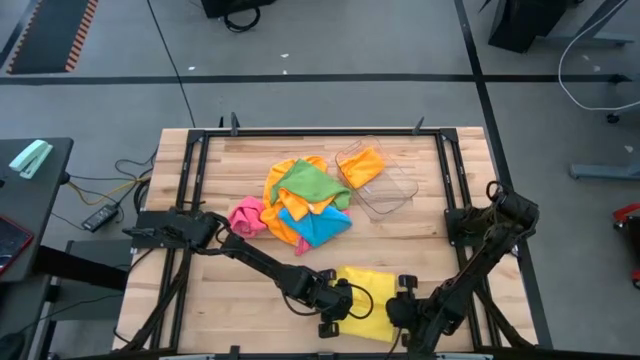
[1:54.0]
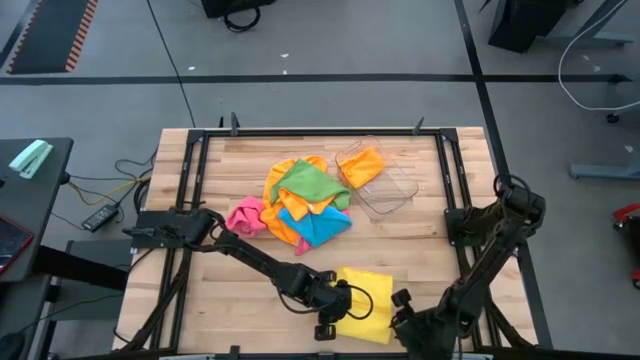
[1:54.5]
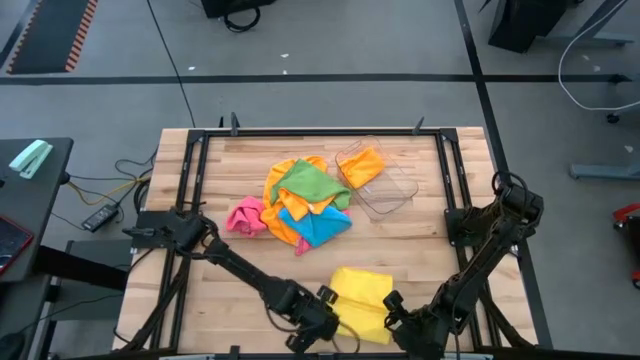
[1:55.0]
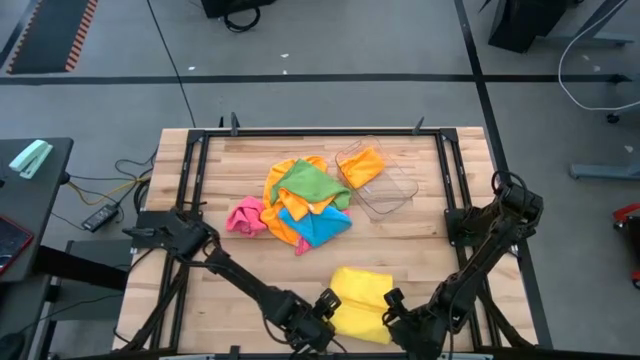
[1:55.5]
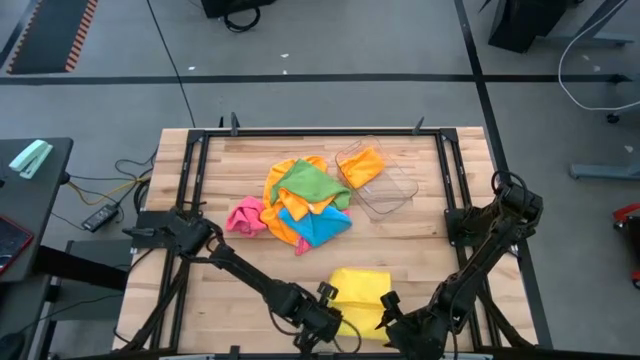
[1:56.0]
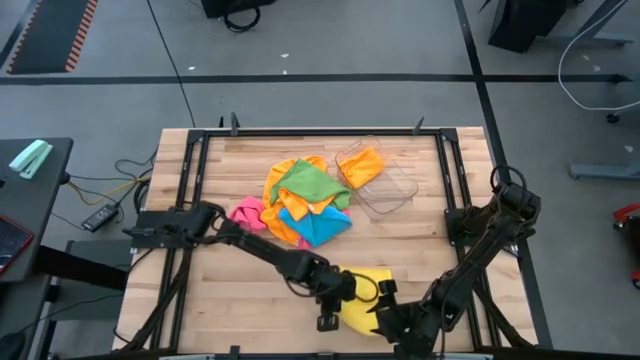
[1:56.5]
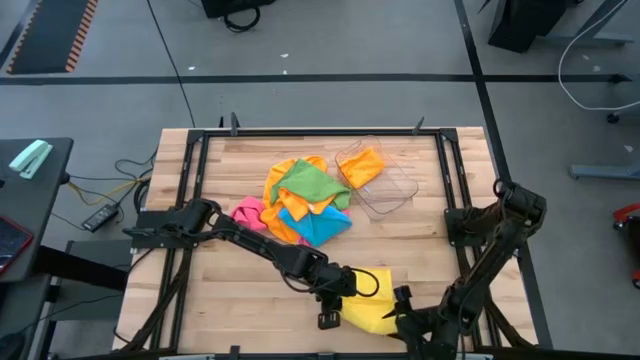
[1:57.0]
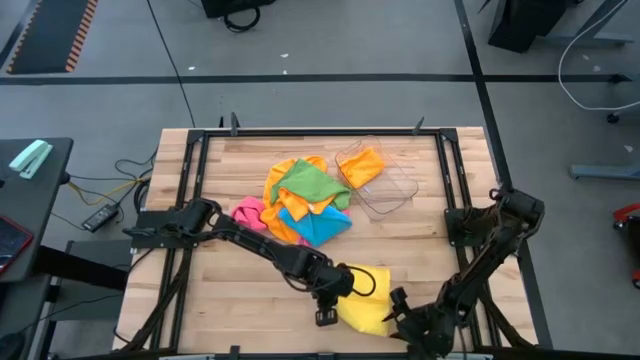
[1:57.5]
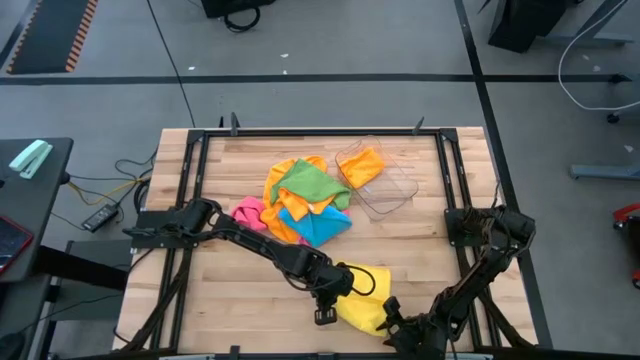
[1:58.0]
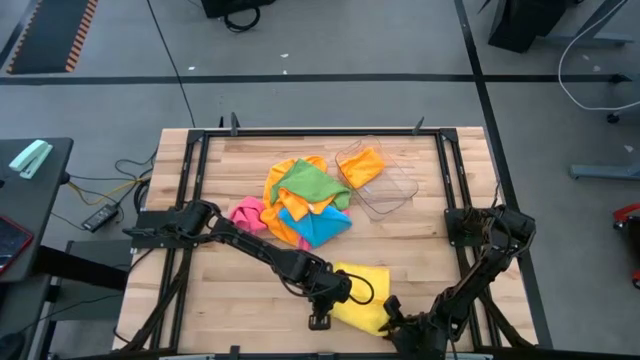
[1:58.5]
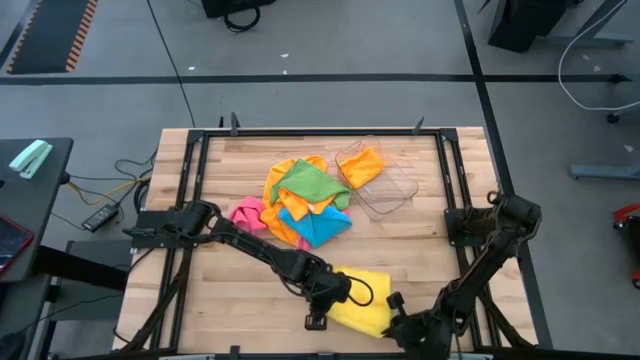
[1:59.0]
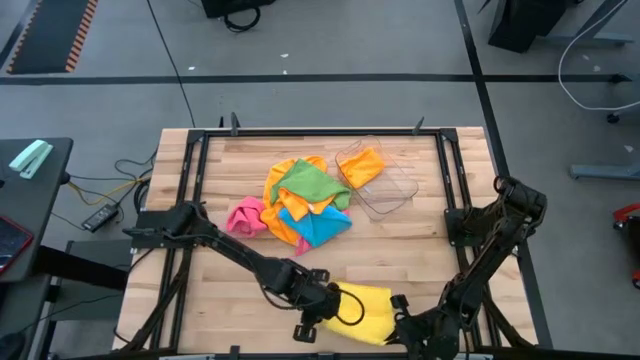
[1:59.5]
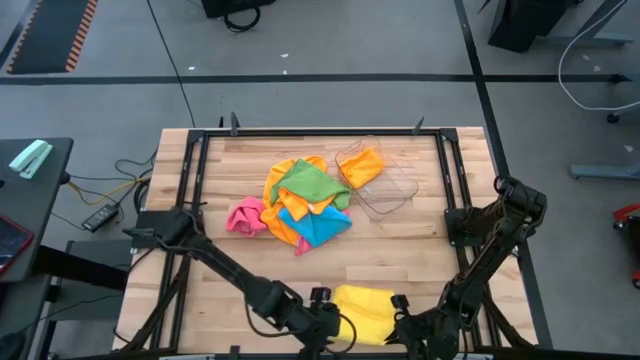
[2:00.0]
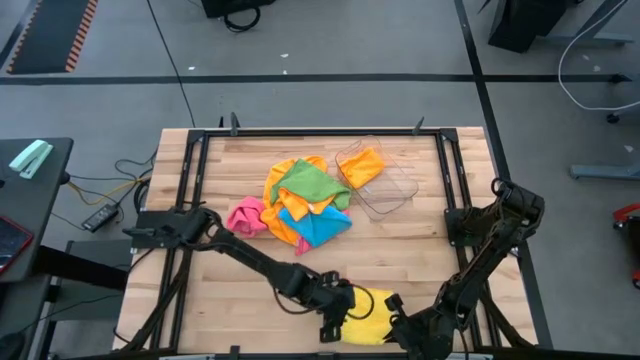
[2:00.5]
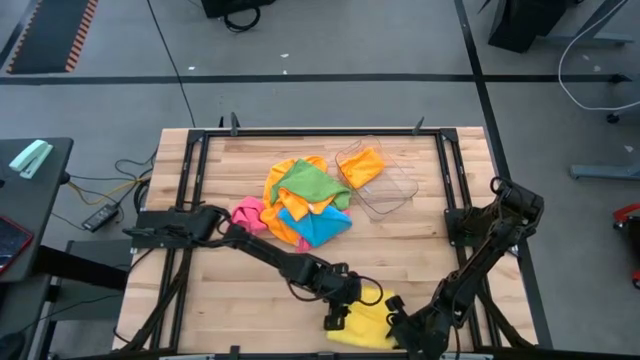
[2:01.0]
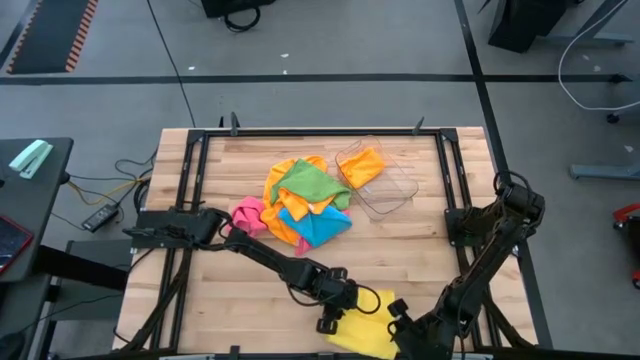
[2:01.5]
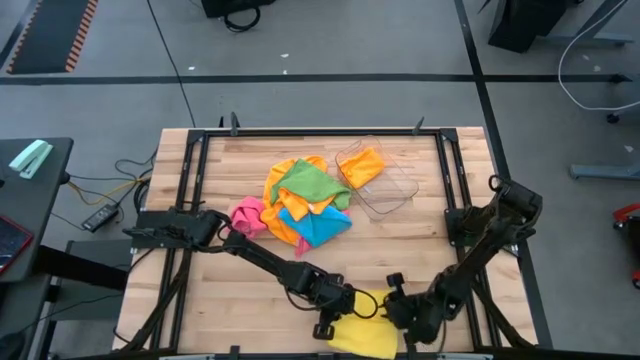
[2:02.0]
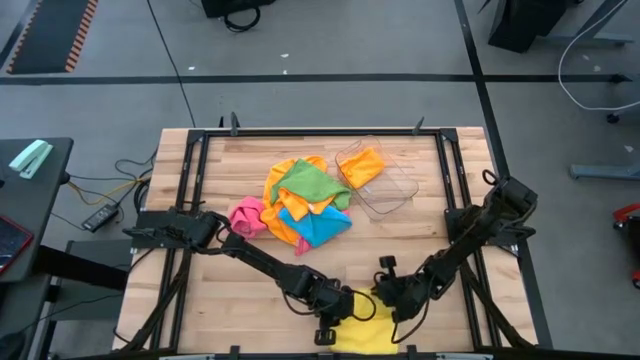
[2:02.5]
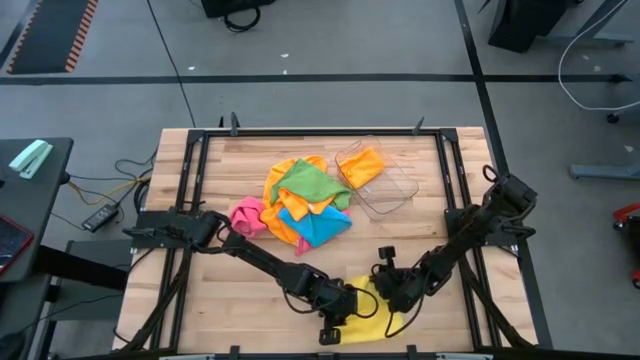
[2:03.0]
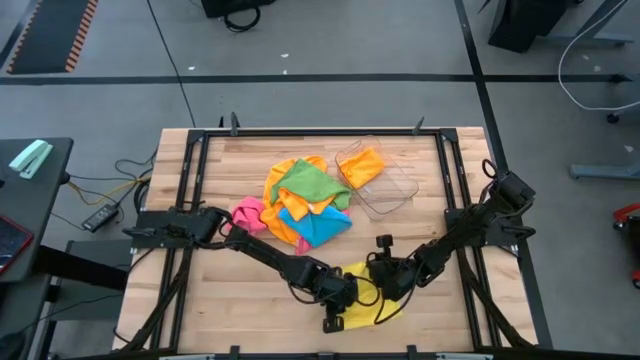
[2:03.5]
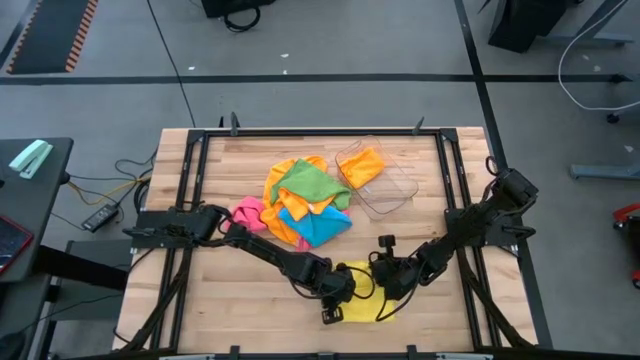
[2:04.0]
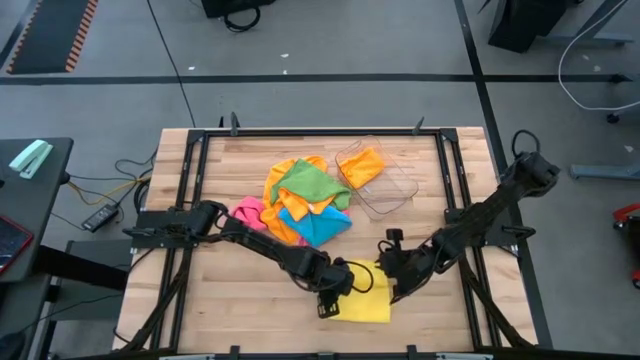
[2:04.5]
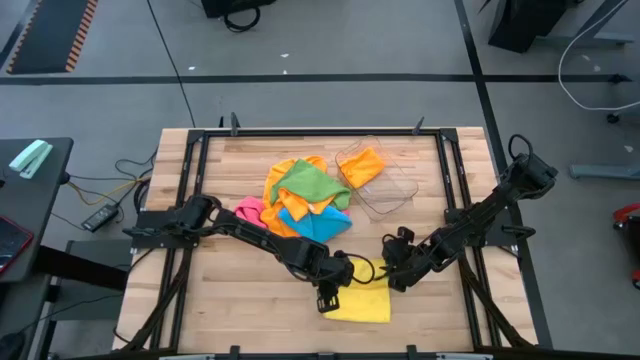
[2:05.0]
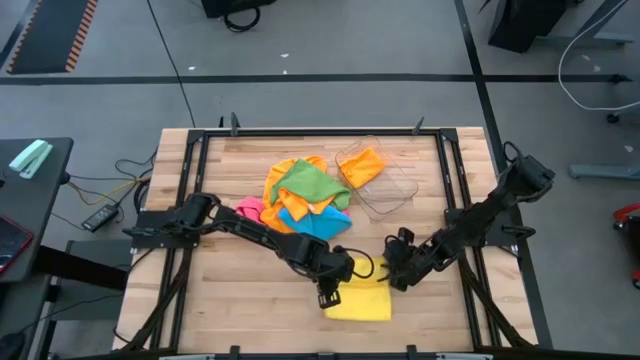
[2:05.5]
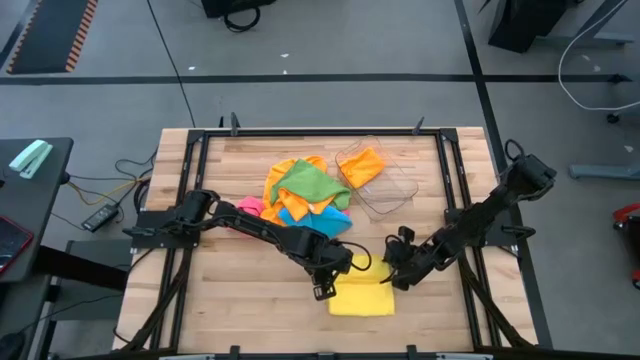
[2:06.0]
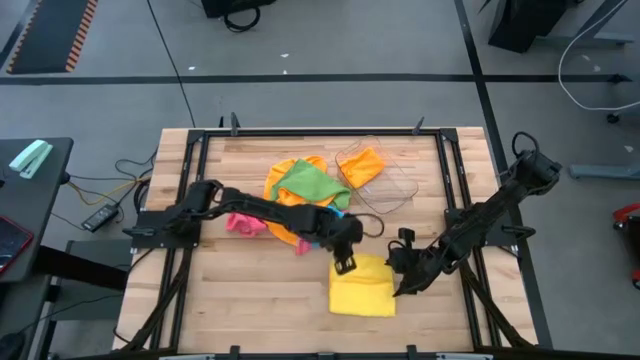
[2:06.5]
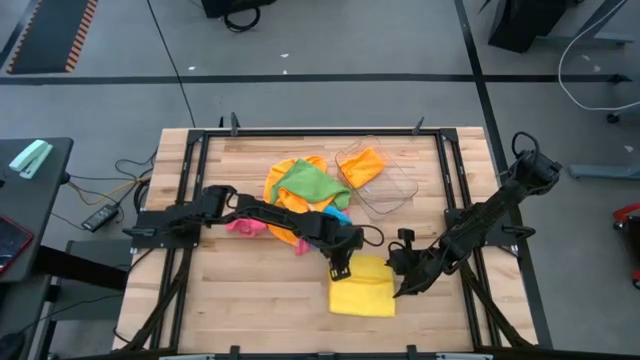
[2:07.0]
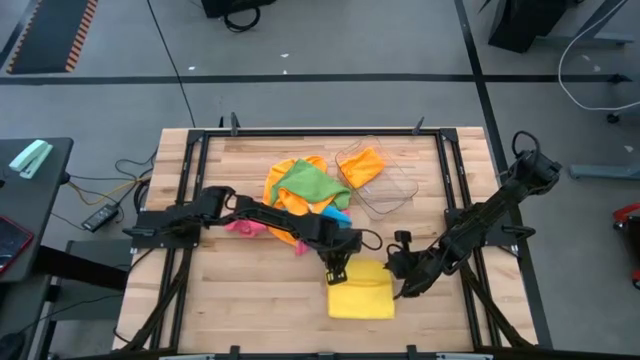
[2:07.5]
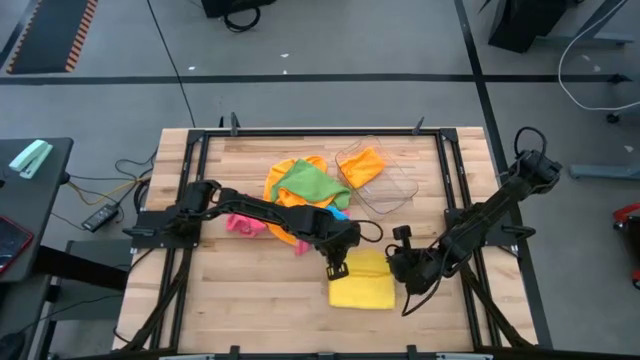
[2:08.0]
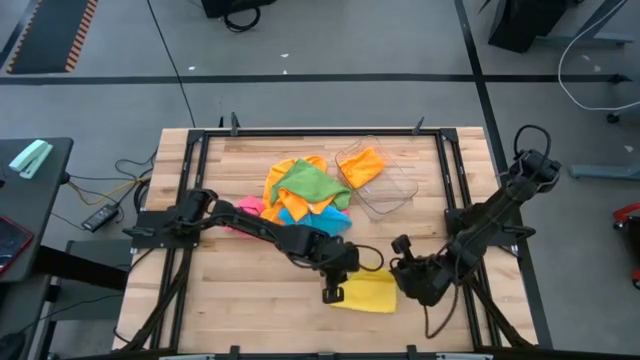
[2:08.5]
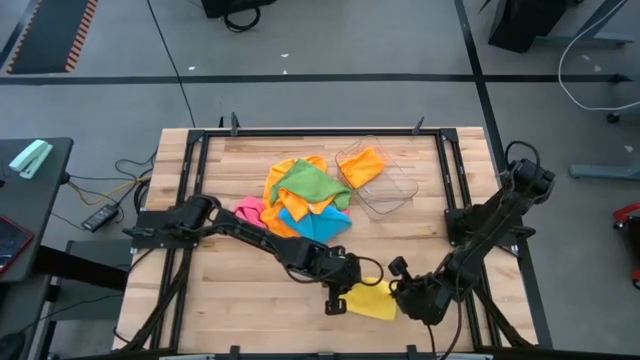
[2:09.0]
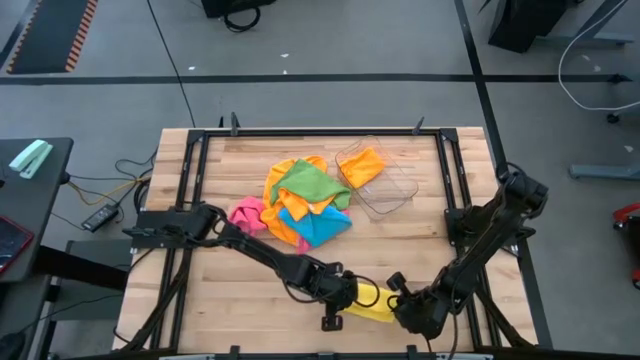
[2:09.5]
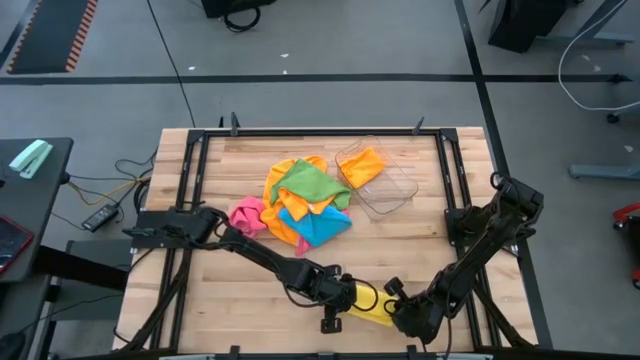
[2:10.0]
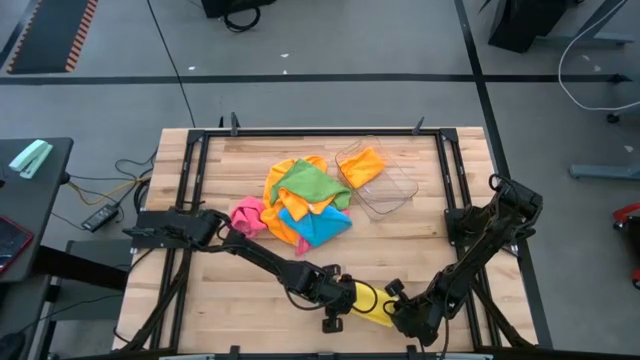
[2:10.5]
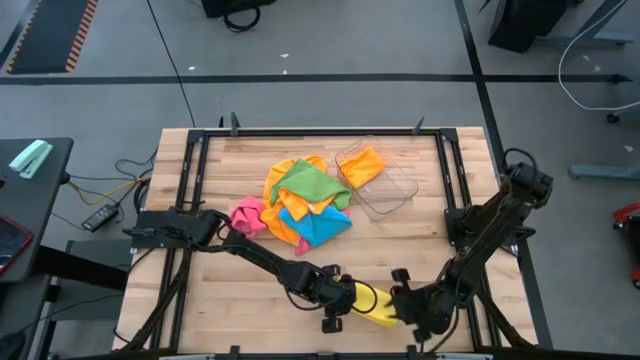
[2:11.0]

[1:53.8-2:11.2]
Task: Fold microfiber towels
Fold the yellow towel

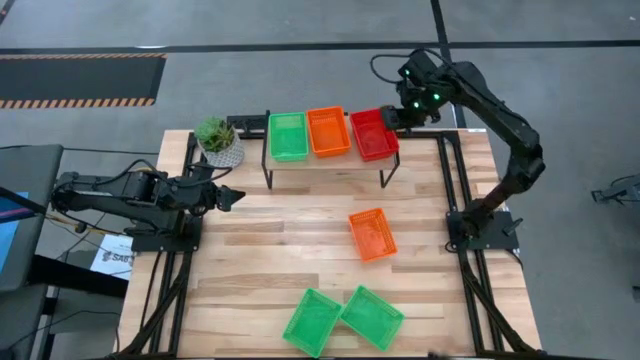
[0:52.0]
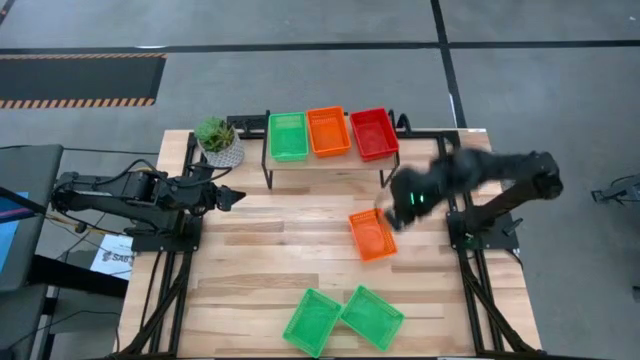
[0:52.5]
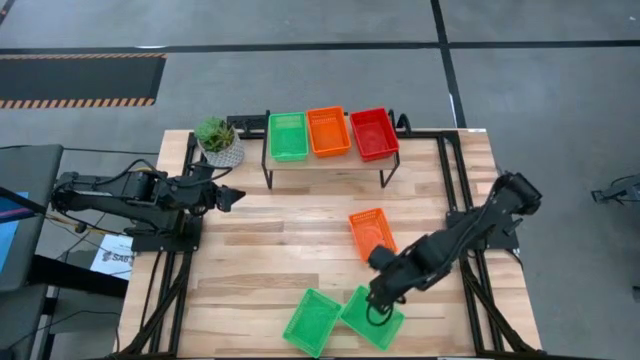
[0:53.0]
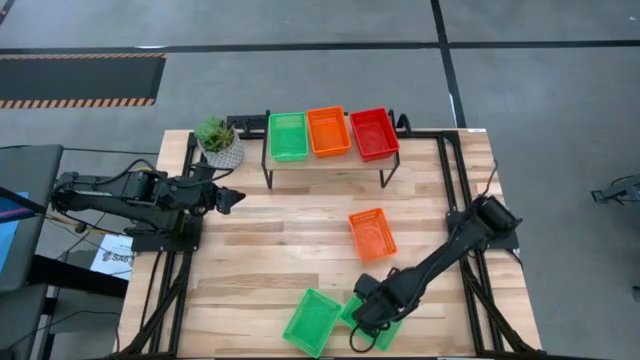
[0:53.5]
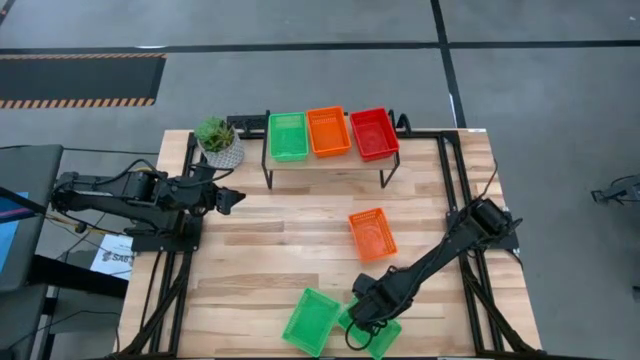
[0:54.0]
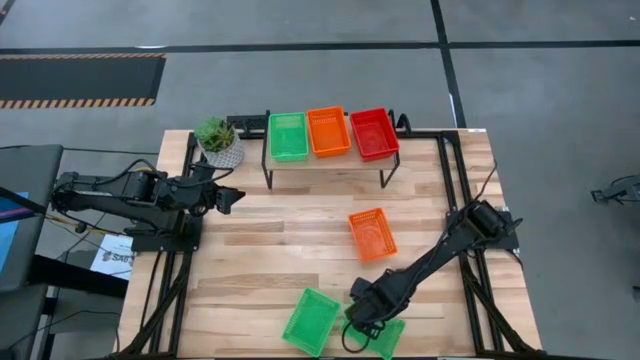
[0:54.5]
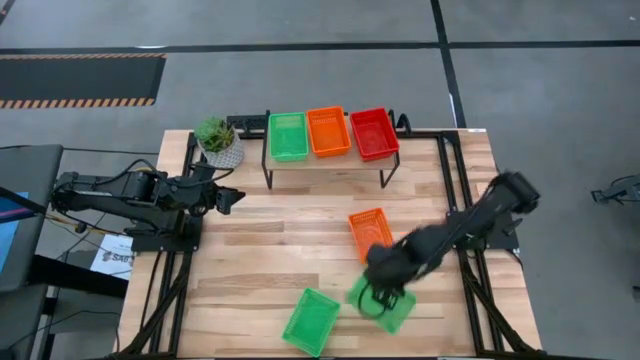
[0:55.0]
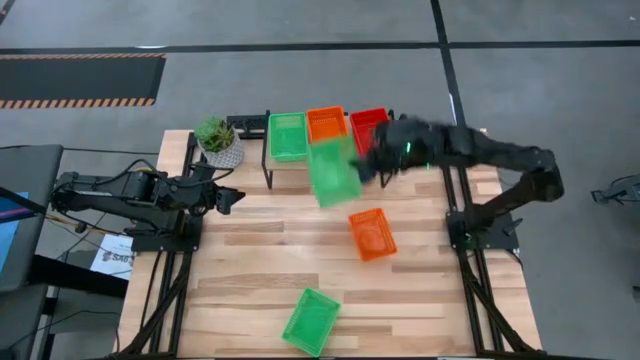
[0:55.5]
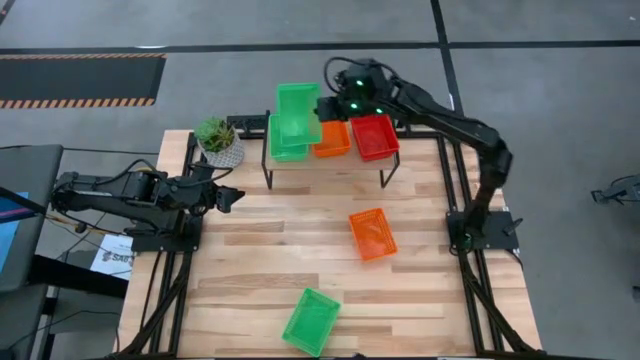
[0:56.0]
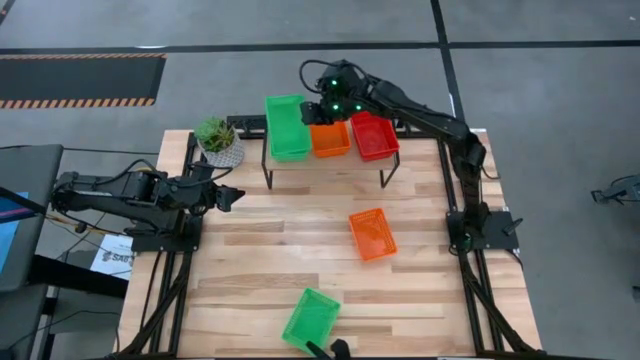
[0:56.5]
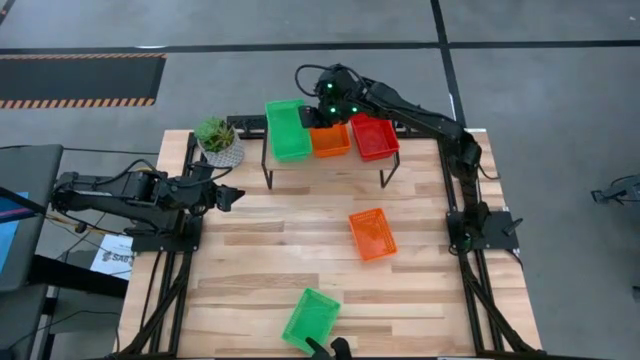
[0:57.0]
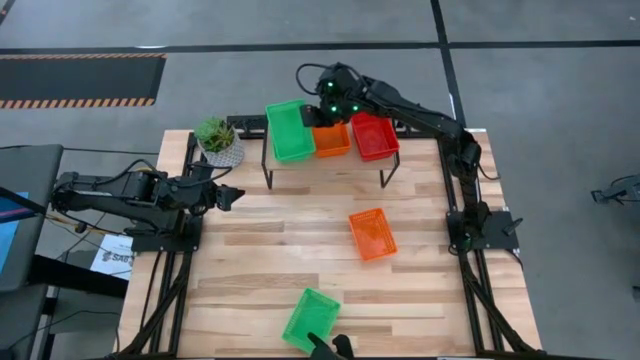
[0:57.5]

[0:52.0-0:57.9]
Task: Stack baskets on shelf by color
Stack the right green bin on top of the green bin on the shelf
